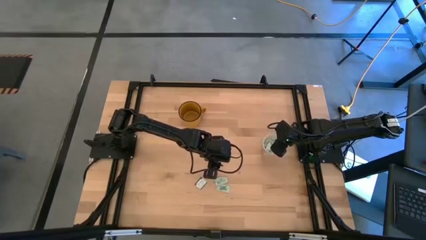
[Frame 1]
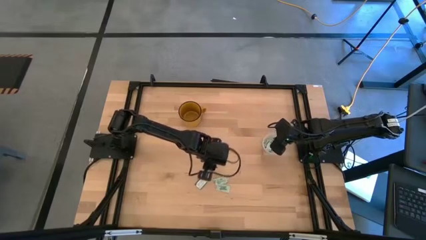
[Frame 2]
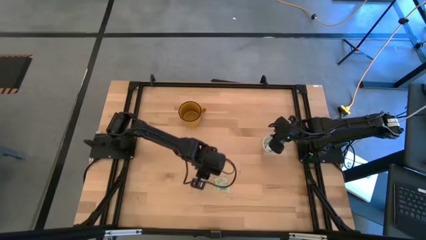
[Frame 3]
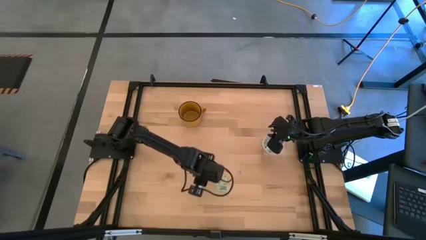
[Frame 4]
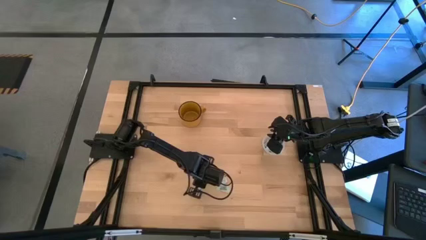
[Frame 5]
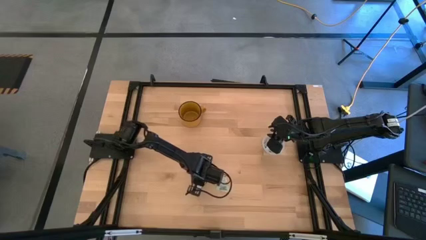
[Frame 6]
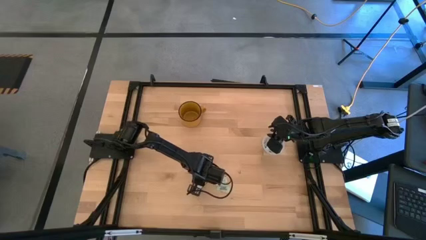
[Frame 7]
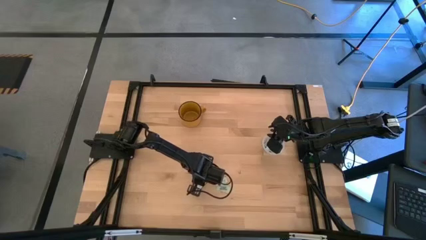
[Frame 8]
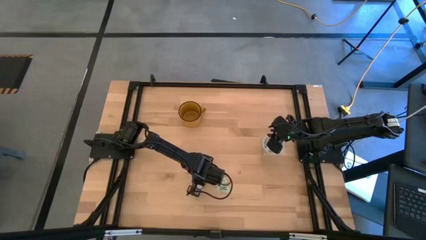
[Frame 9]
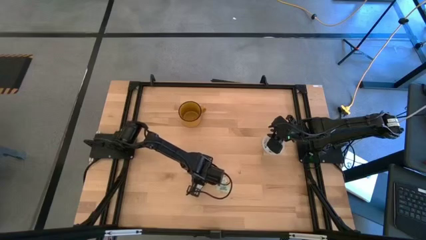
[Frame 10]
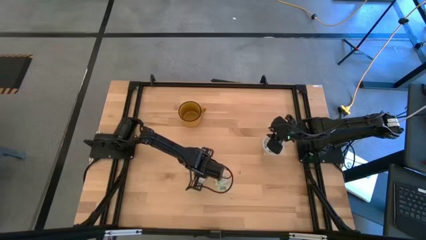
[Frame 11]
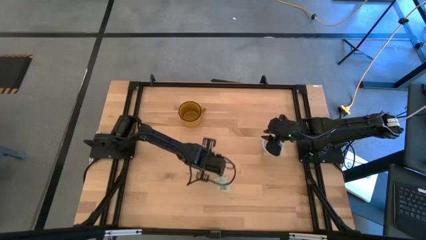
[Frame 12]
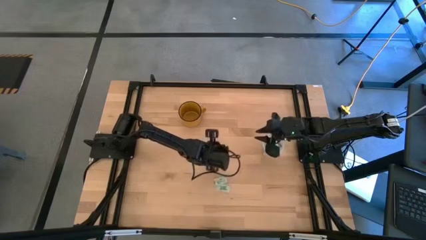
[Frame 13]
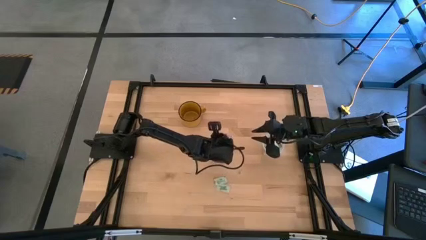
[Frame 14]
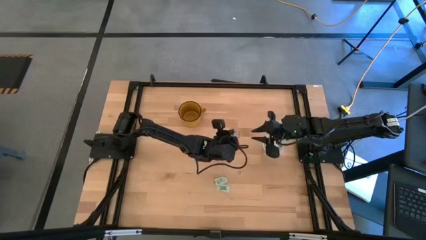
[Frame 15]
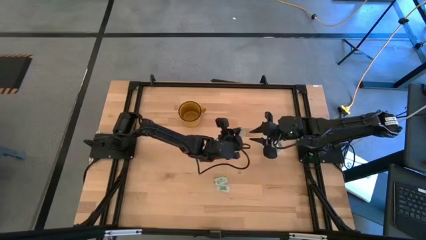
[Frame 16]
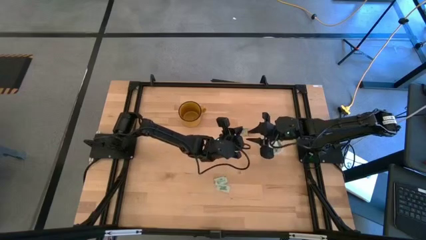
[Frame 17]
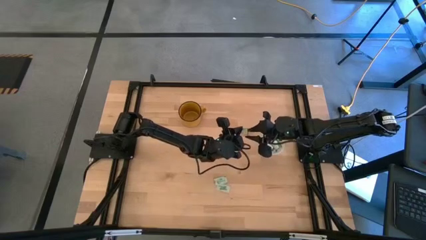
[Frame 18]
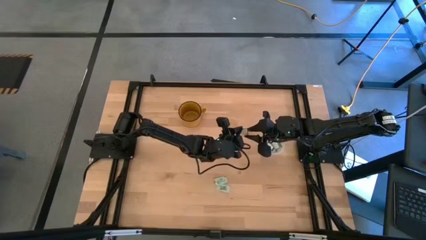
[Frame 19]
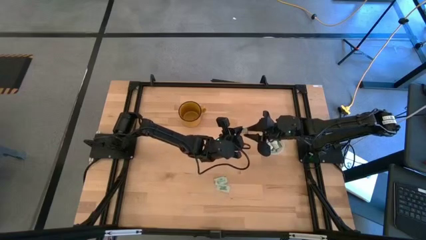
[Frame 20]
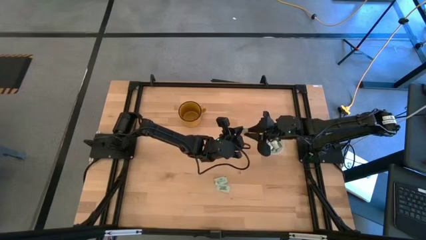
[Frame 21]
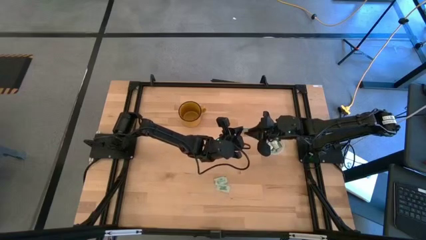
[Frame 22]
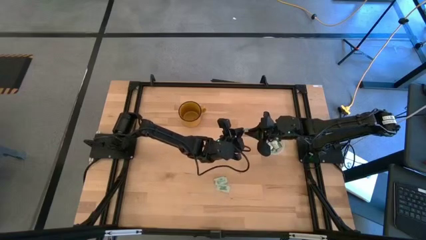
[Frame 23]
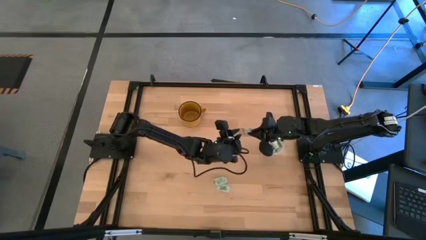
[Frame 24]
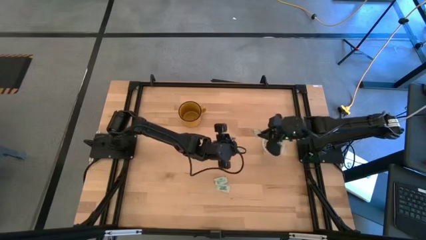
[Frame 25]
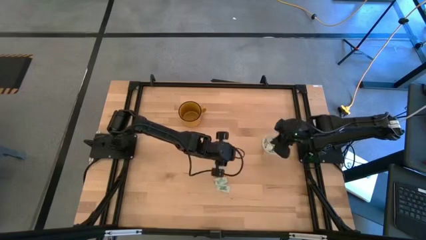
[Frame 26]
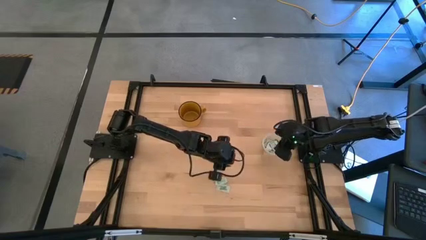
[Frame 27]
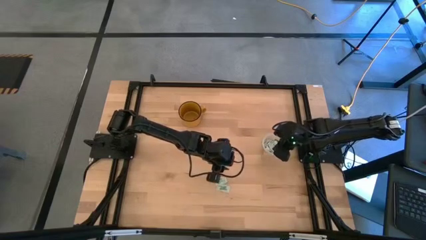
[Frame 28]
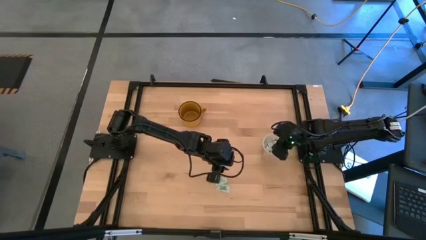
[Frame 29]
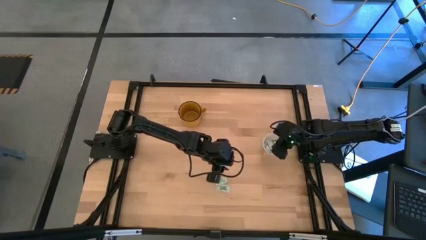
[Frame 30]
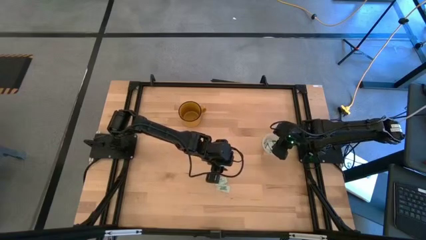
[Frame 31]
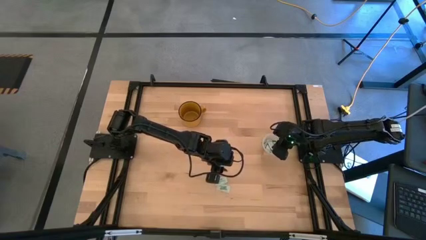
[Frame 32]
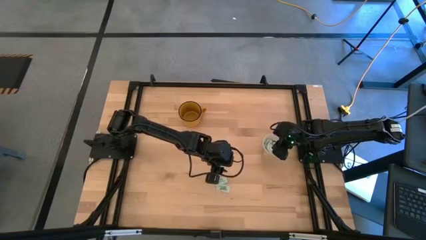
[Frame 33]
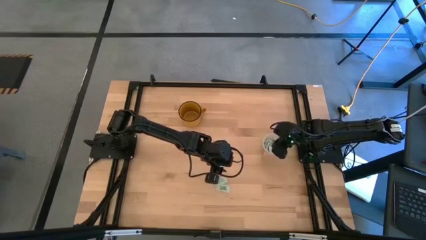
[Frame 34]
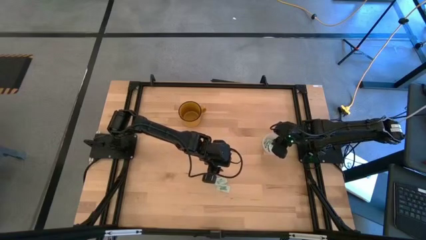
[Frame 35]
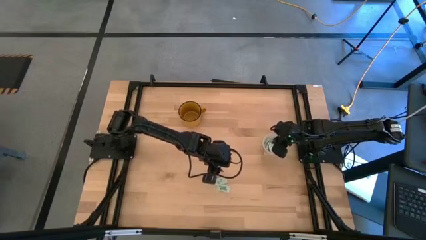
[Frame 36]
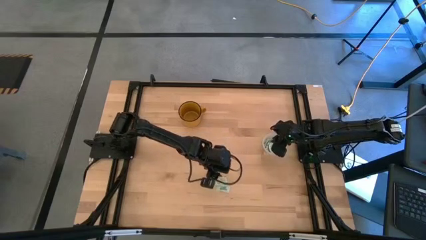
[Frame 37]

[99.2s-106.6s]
Task: Pick and place items into bin
Put the truvia packet into the transparent bin

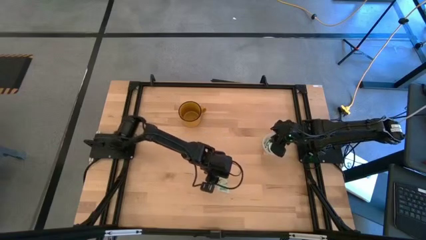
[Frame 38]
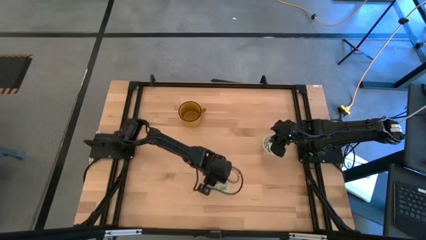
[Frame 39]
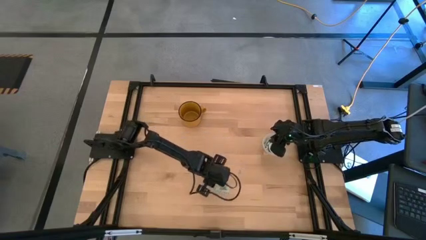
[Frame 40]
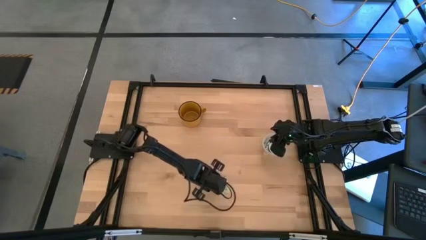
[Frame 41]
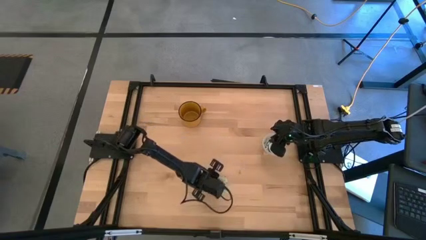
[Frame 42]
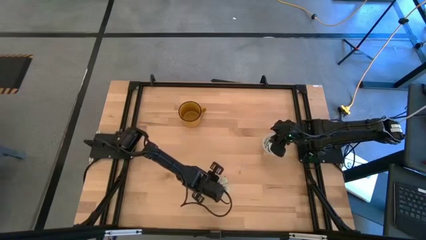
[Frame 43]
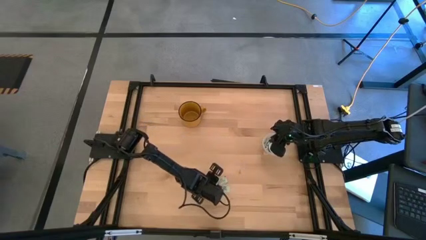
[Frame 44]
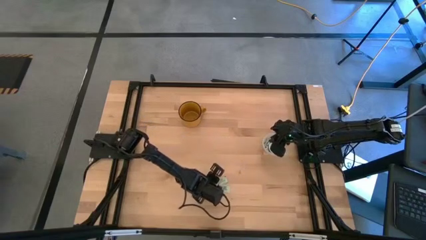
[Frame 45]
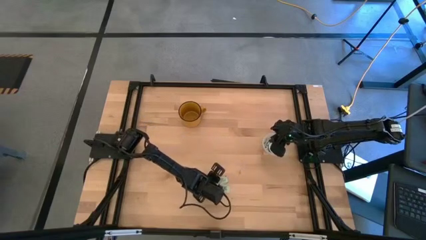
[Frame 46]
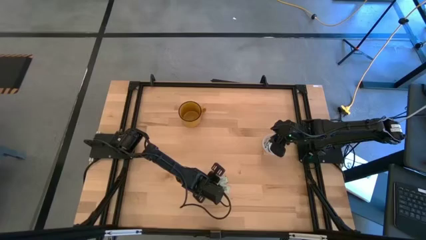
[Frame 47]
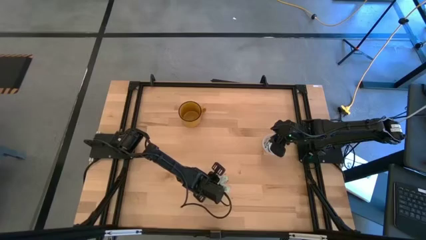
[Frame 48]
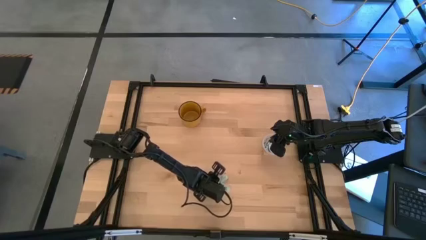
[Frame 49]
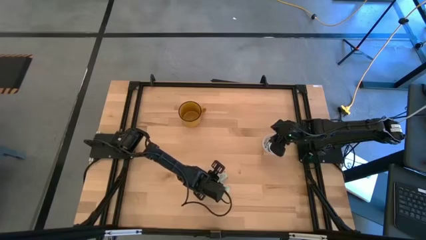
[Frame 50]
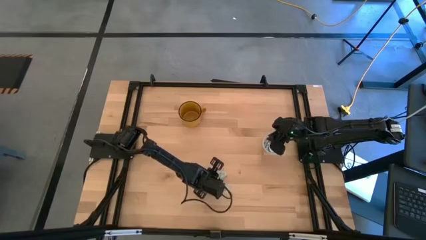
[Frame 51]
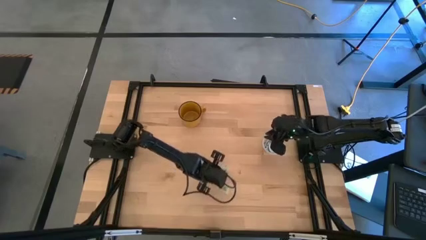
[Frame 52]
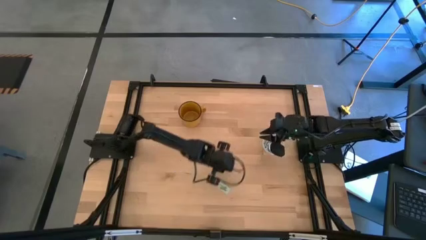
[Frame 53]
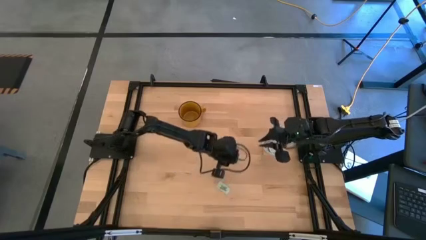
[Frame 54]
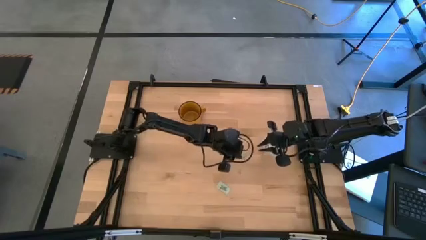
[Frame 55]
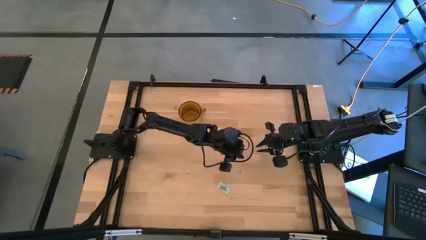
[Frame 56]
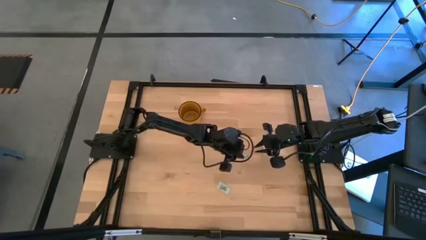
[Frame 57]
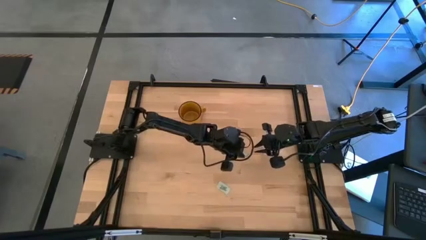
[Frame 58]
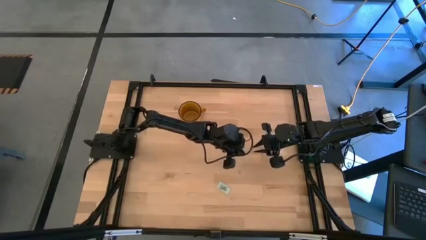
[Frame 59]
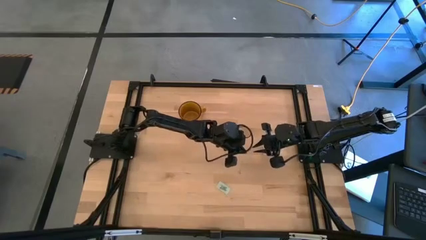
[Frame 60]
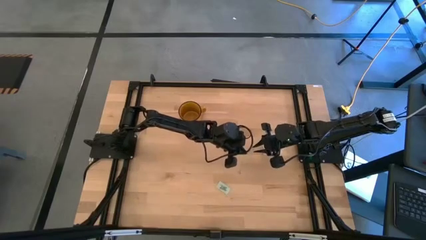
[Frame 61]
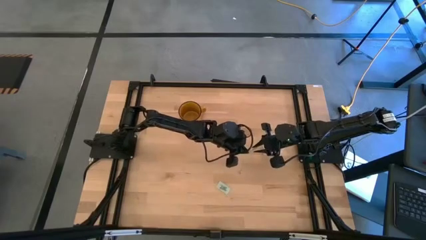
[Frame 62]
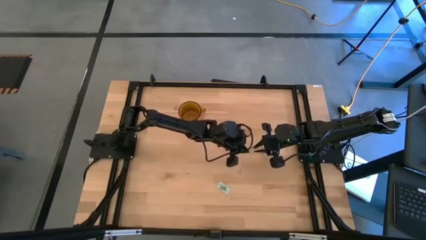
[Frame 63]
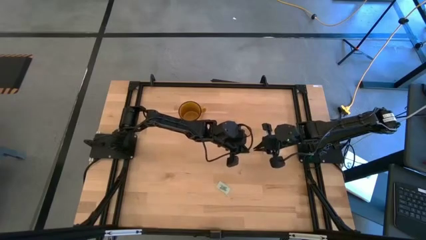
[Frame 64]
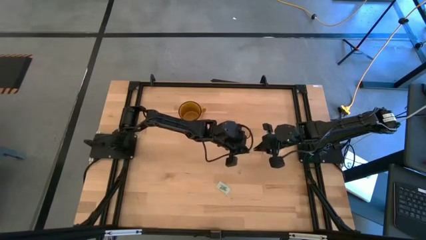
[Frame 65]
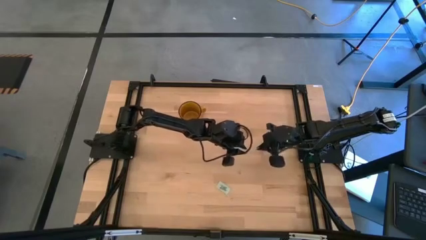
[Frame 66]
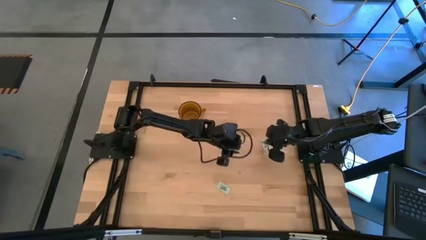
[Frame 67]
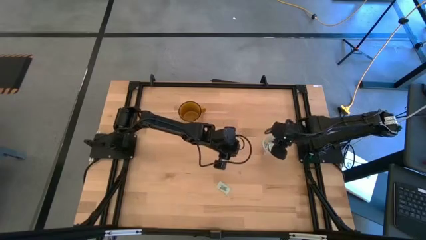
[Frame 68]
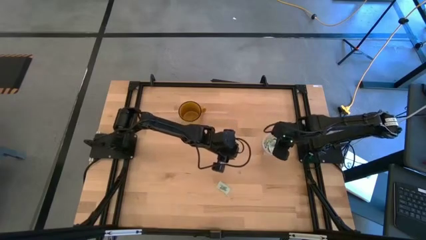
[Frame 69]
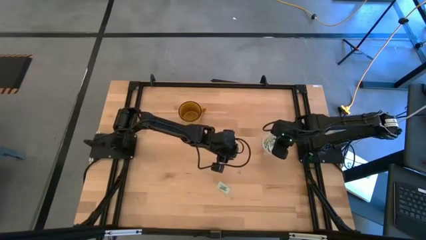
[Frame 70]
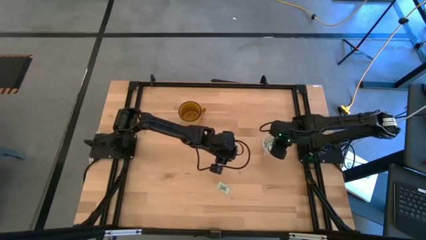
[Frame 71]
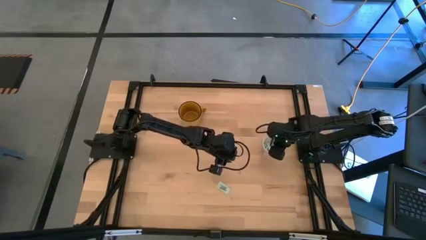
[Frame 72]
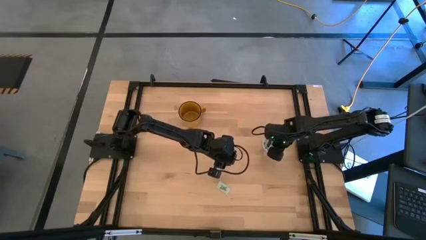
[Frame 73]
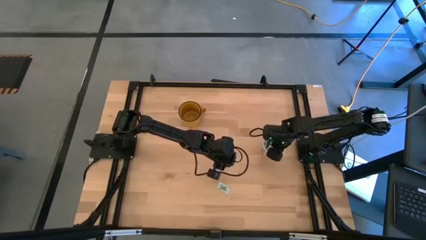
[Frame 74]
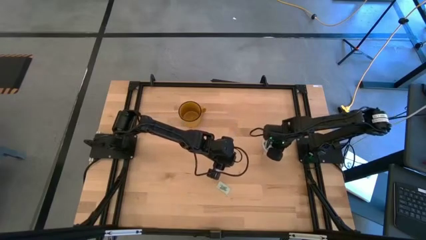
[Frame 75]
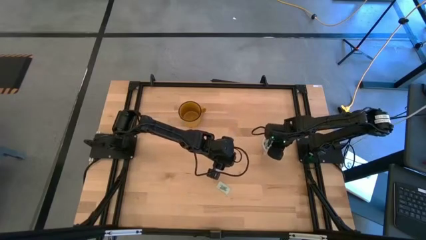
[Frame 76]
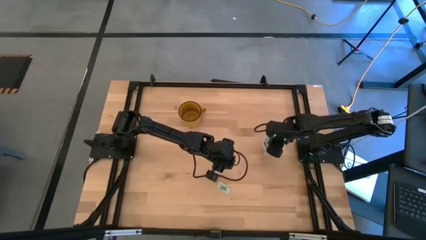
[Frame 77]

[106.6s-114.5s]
Put the stevia packet into the transparent bin

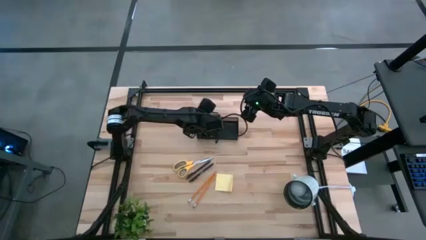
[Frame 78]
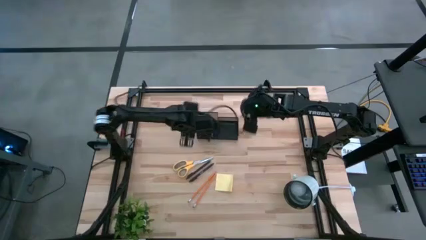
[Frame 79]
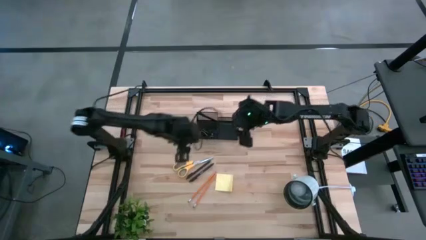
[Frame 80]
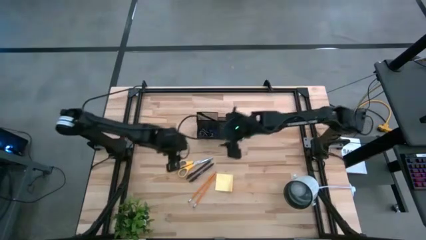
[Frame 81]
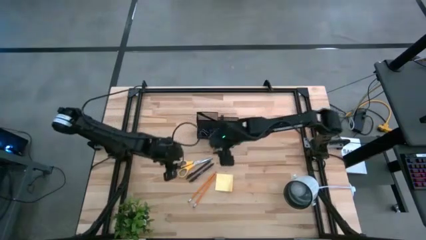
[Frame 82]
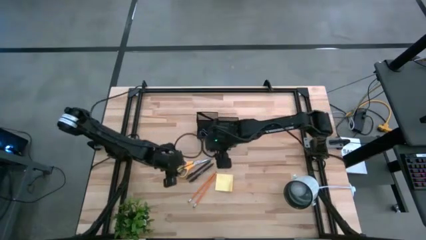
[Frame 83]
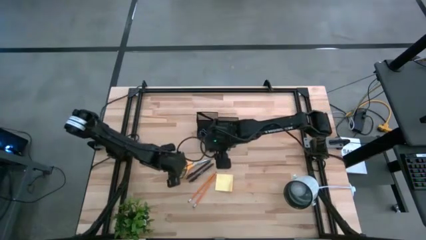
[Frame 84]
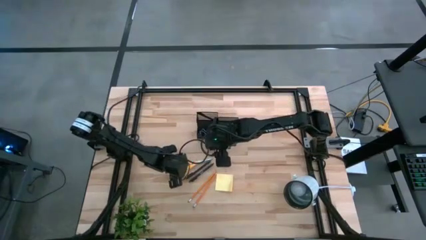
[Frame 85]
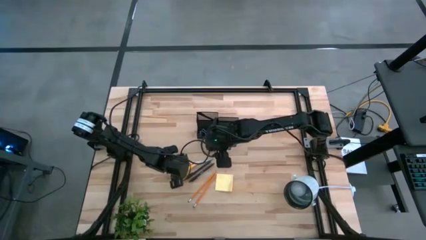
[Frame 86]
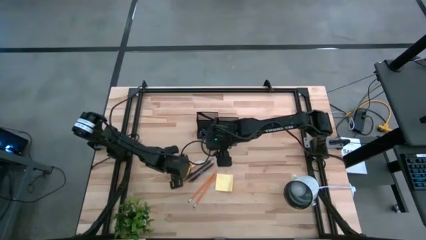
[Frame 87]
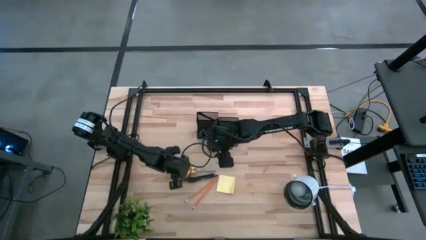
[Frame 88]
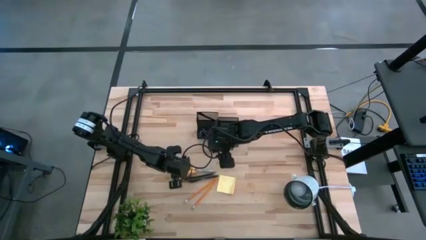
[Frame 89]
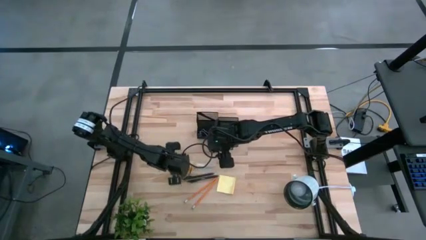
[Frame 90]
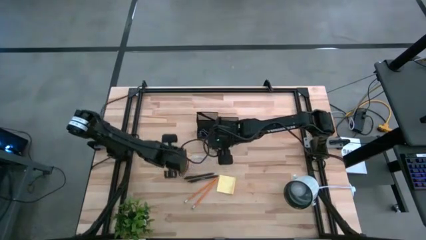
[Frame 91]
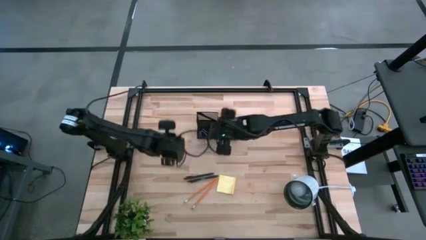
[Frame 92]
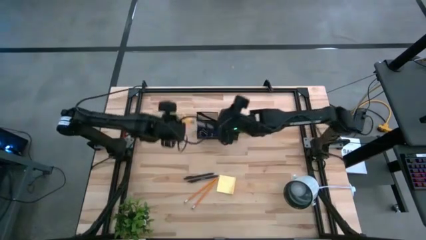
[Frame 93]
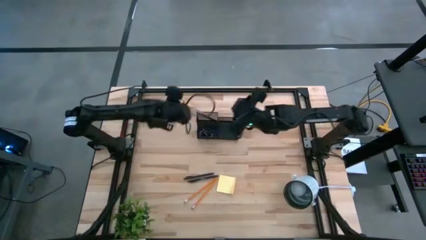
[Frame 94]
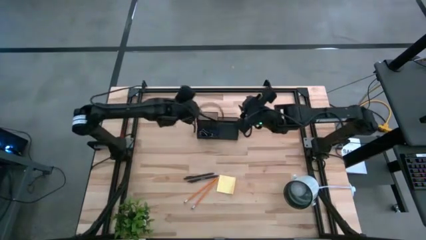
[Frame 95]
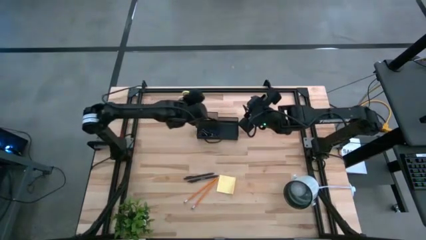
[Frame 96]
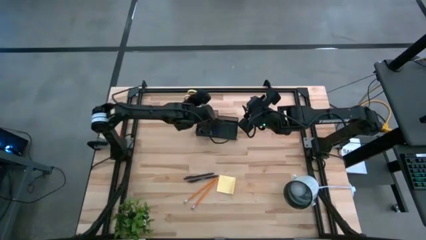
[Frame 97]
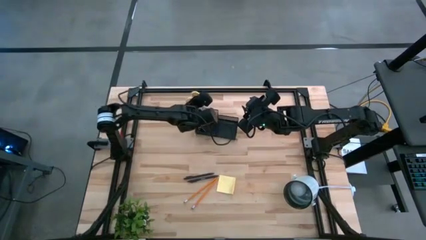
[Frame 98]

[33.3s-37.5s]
Task: Pick and place office supplies into organizer
Put the yellow scissor into the black organizer bin
